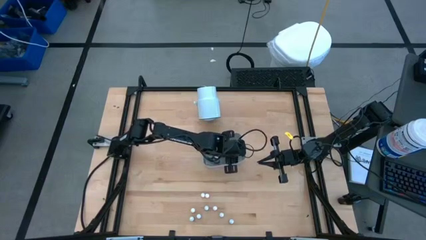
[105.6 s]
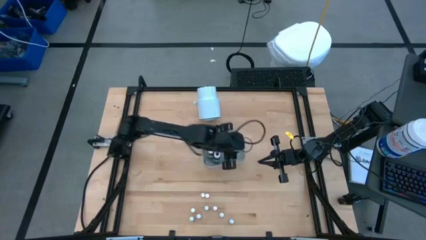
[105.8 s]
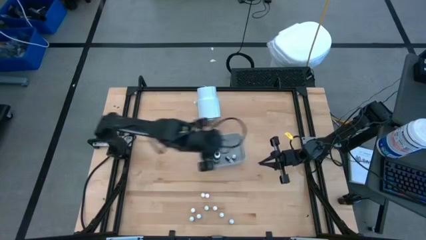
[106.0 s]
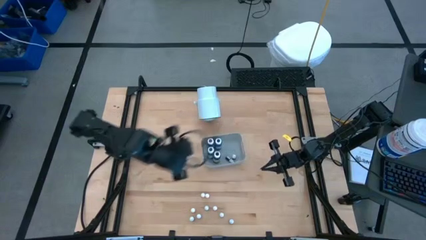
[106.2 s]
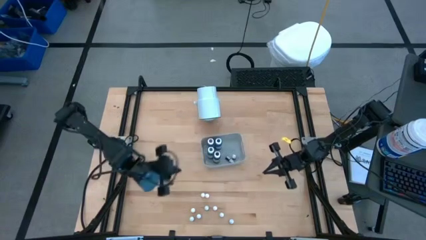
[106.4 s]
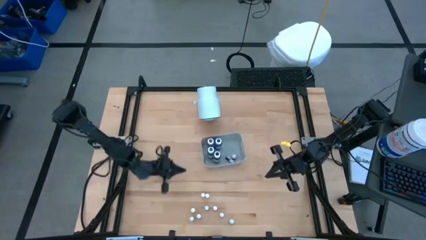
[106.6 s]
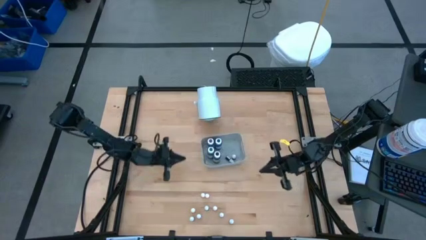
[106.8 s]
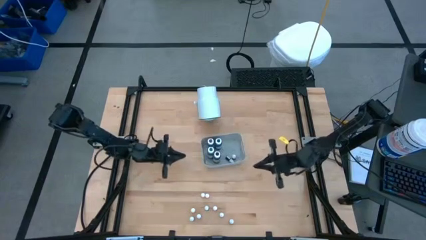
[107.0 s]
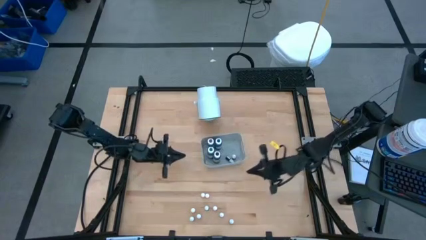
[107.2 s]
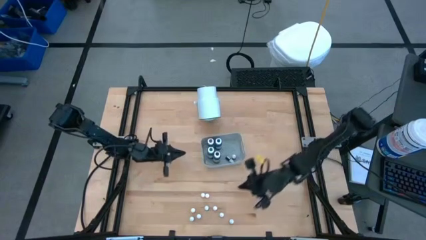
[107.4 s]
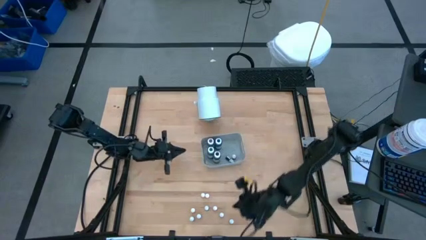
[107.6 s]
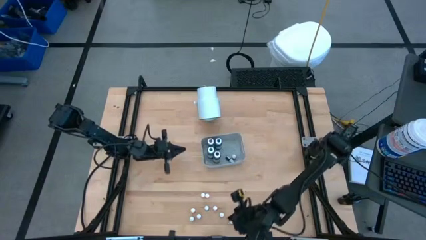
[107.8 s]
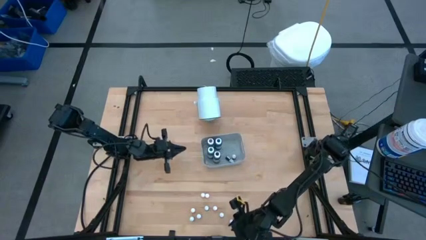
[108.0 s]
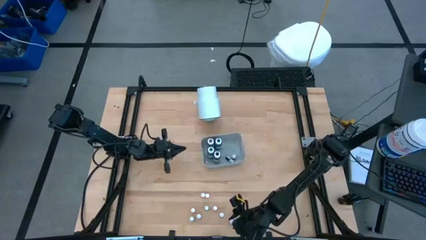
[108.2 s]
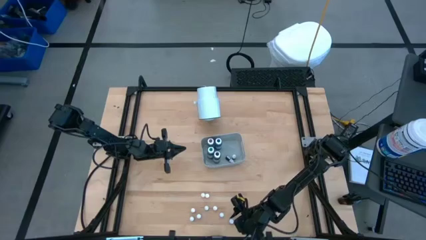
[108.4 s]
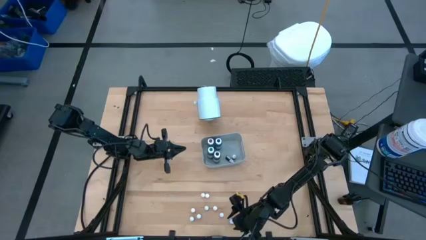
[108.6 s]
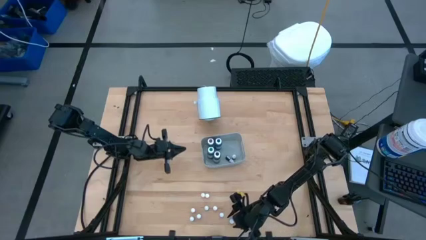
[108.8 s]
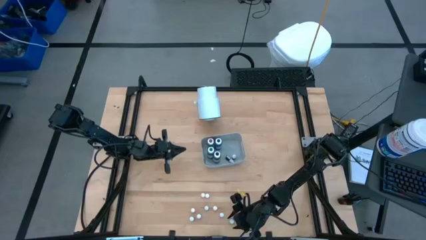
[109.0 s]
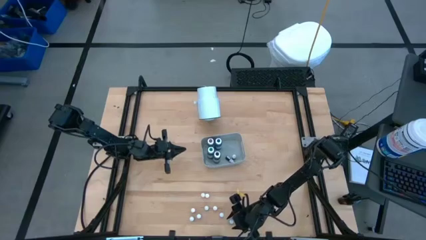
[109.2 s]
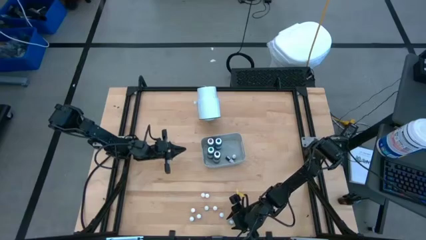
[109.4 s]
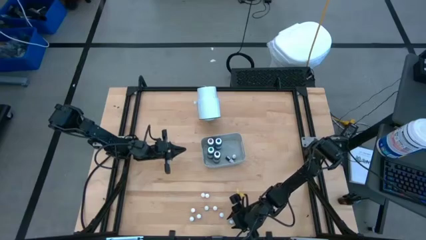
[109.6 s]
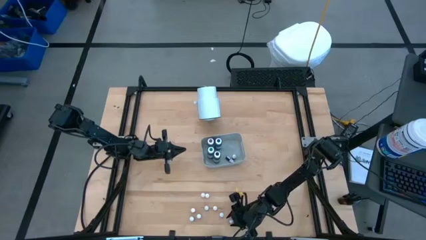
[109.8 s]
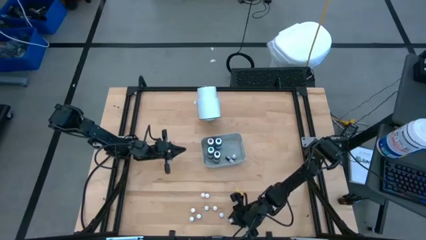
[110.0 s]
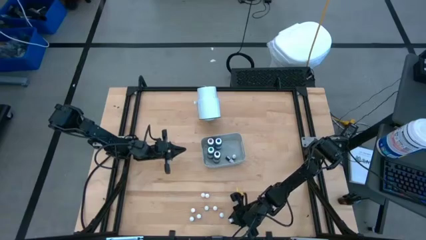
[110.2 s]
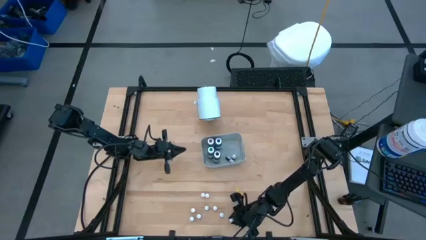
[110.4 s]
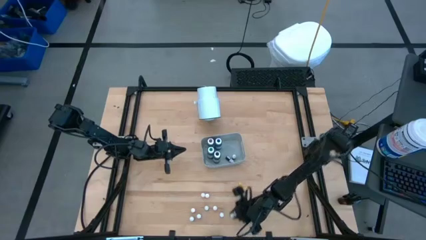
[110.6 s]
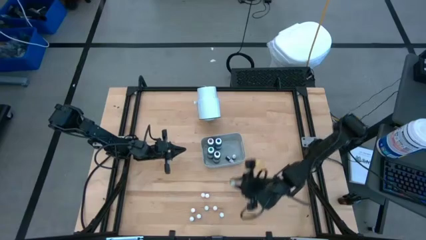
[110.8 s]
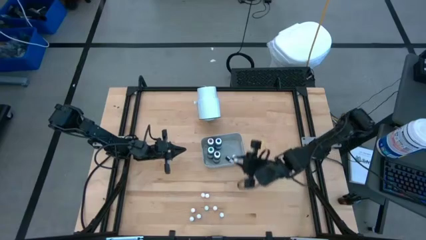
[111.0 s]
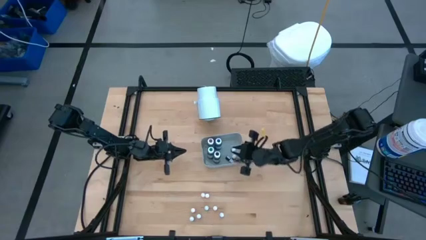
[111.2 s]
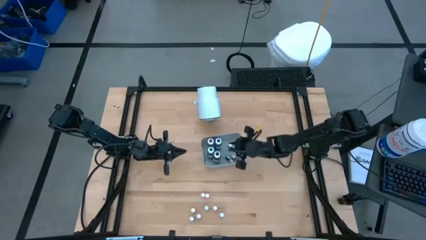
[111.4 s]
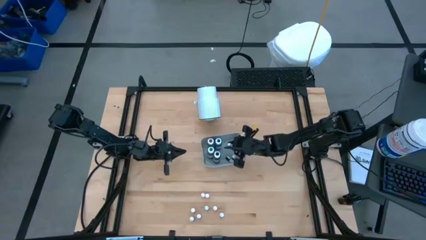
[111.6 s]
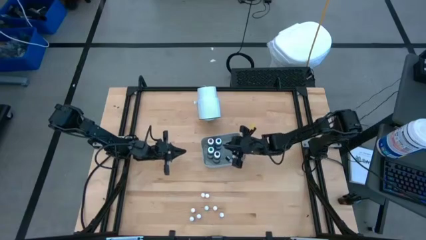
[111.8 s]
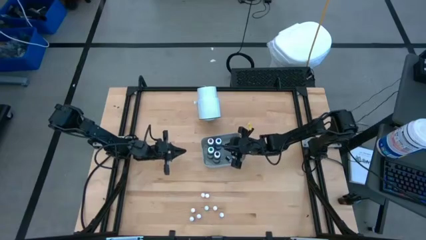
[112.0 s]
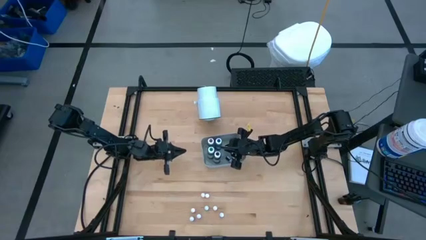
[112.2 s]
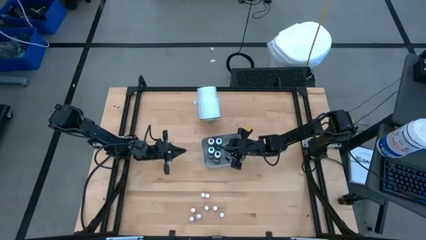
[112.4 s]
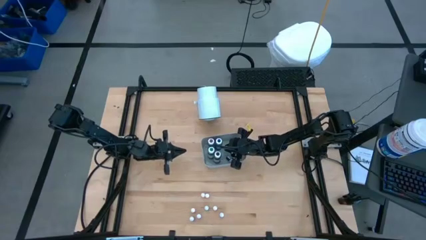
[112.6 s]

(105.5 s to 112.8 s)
Task: Pick & Place food coloring
Put the blue food coloring bottle into the gray bin

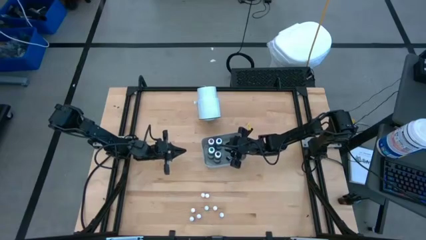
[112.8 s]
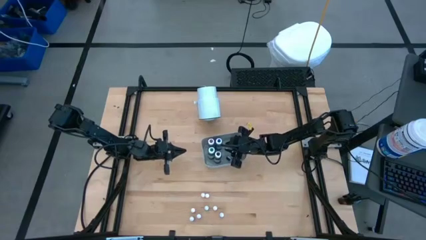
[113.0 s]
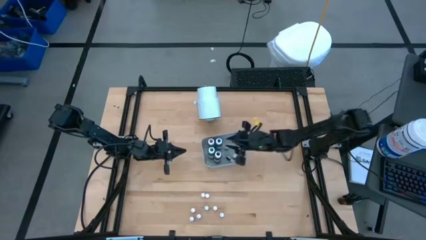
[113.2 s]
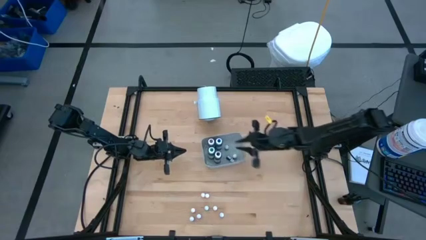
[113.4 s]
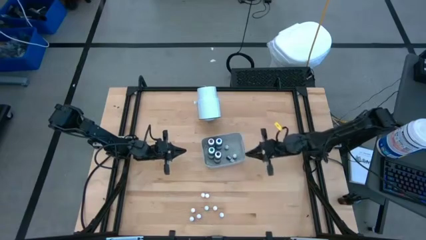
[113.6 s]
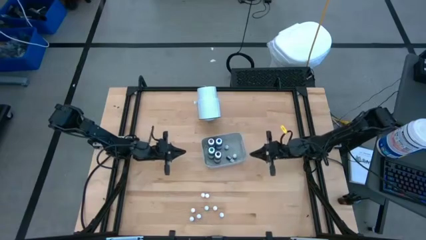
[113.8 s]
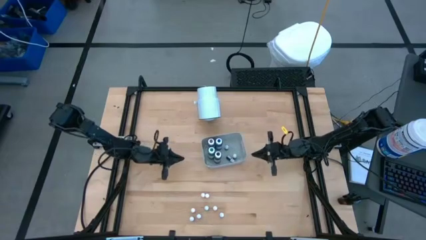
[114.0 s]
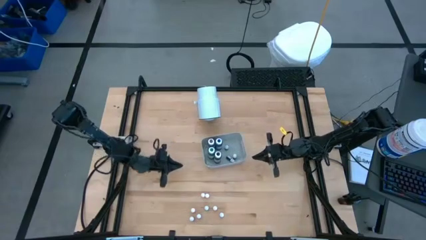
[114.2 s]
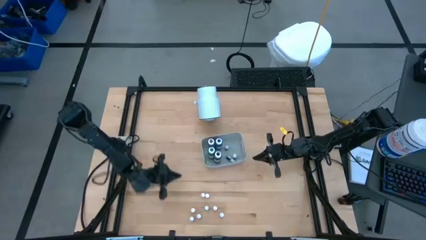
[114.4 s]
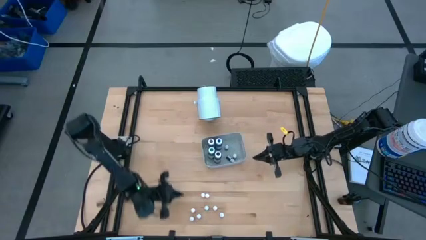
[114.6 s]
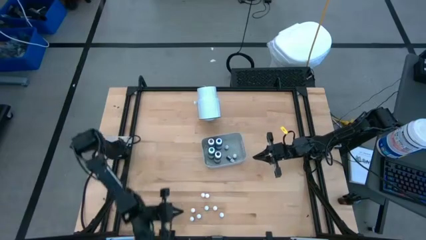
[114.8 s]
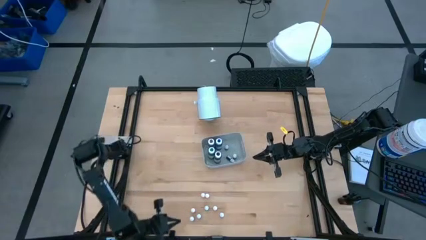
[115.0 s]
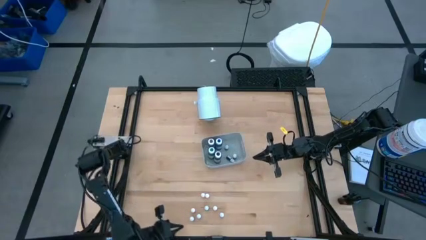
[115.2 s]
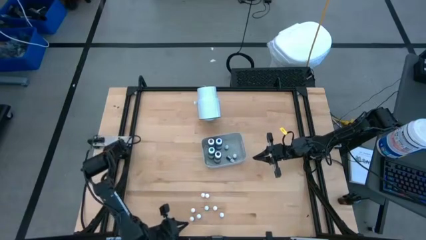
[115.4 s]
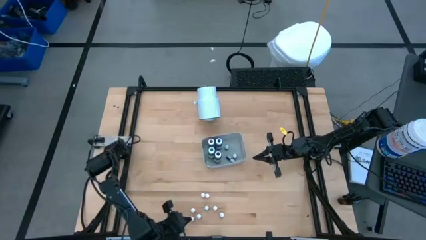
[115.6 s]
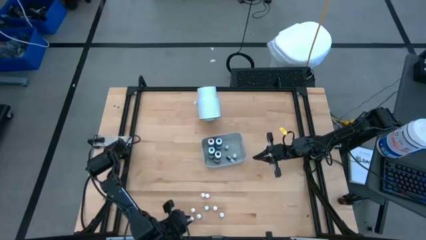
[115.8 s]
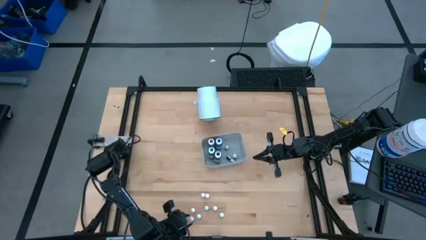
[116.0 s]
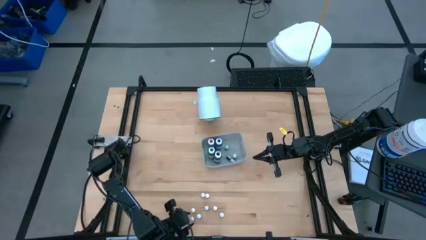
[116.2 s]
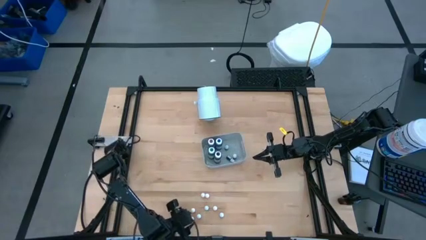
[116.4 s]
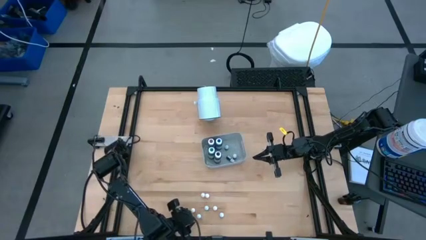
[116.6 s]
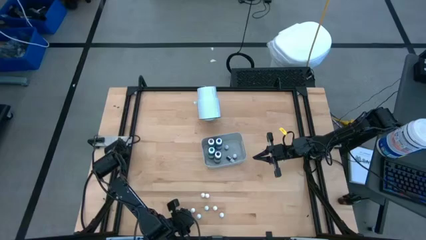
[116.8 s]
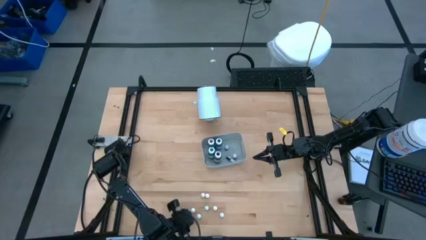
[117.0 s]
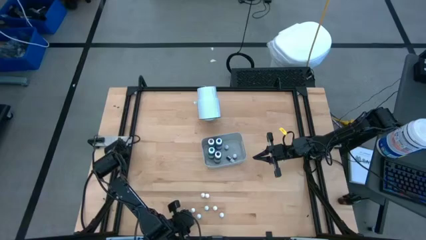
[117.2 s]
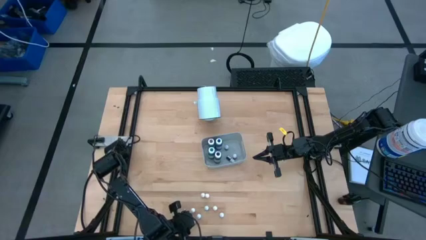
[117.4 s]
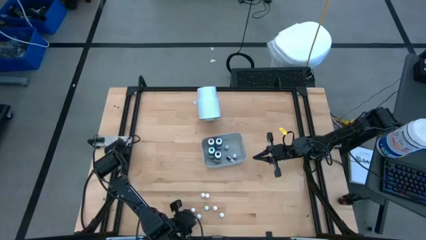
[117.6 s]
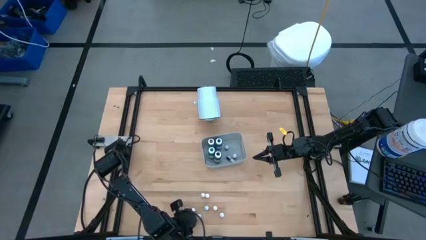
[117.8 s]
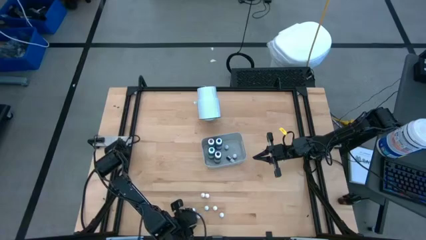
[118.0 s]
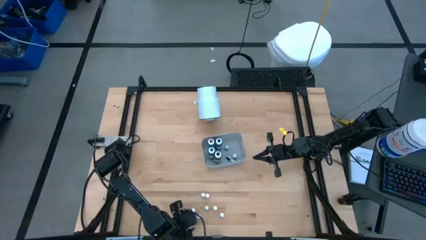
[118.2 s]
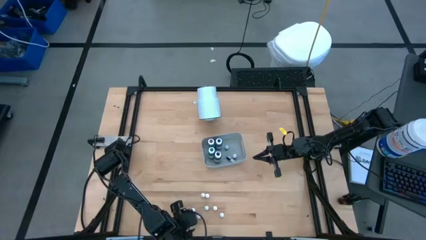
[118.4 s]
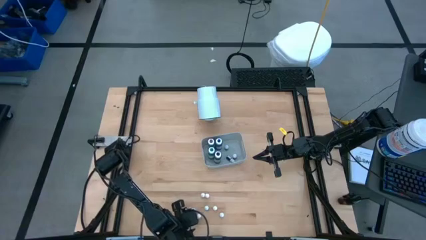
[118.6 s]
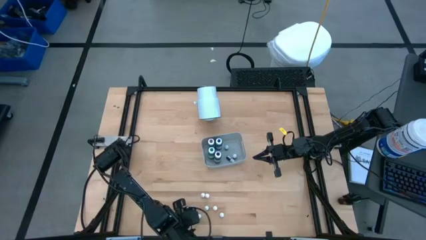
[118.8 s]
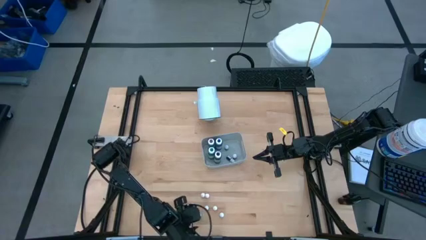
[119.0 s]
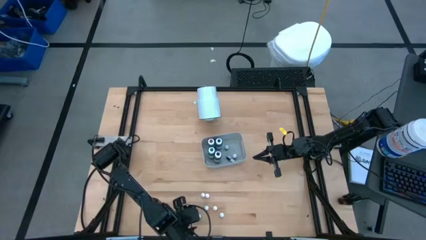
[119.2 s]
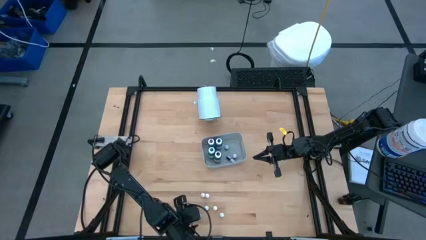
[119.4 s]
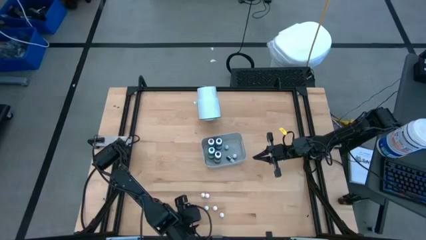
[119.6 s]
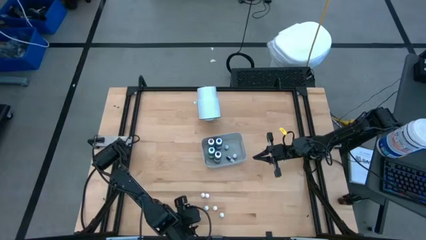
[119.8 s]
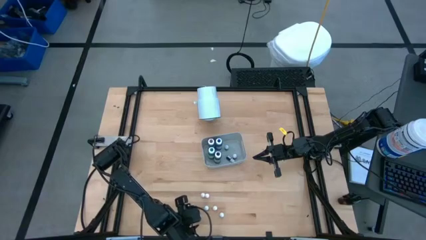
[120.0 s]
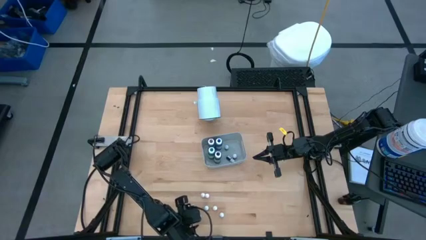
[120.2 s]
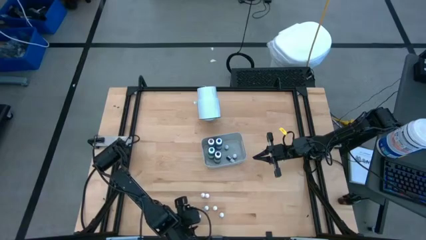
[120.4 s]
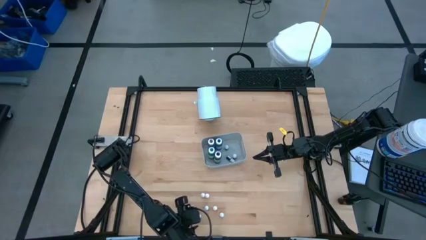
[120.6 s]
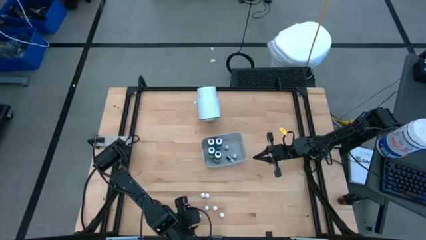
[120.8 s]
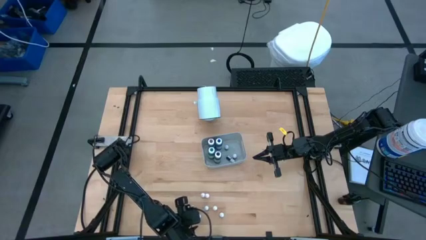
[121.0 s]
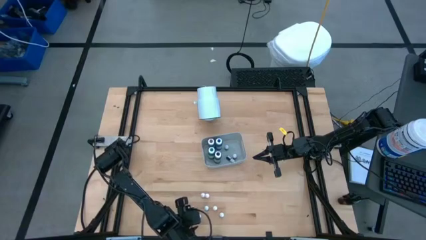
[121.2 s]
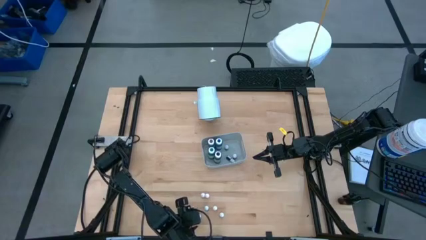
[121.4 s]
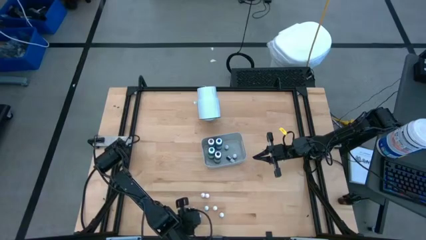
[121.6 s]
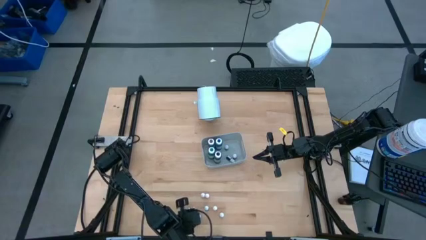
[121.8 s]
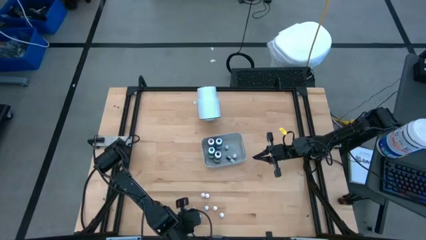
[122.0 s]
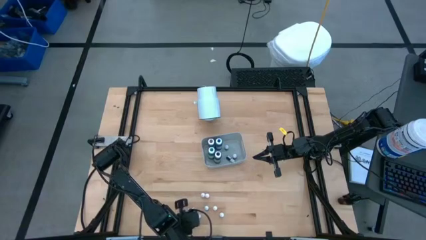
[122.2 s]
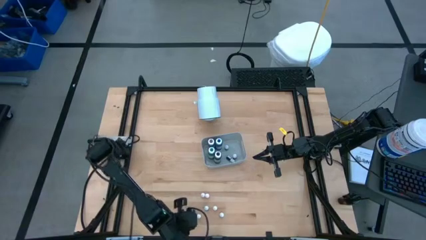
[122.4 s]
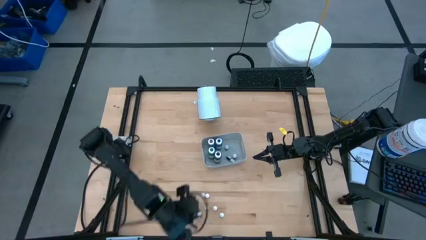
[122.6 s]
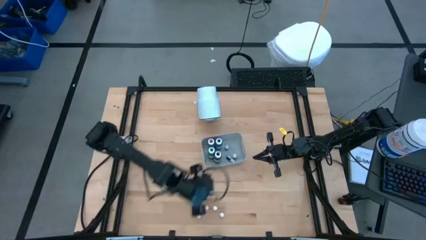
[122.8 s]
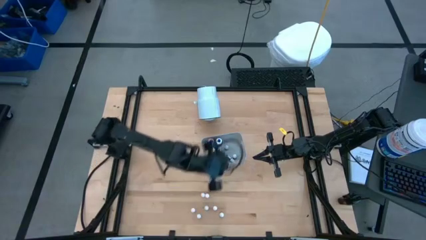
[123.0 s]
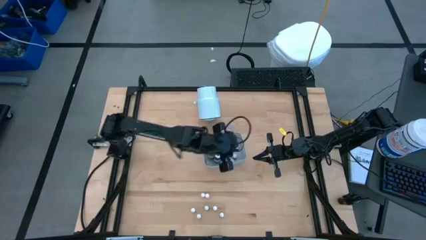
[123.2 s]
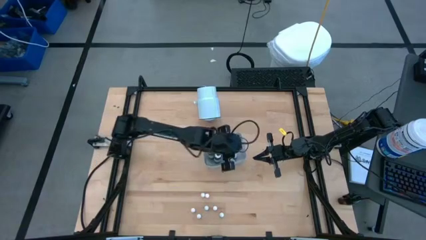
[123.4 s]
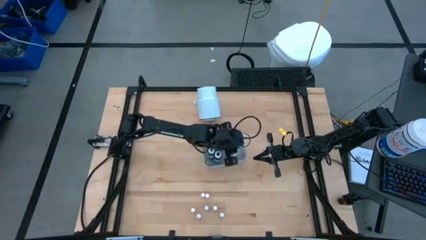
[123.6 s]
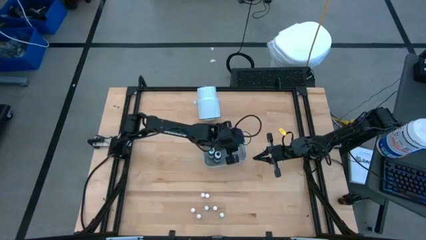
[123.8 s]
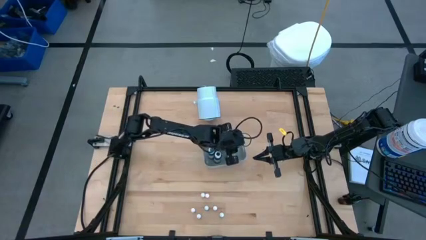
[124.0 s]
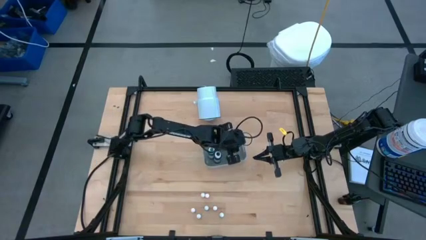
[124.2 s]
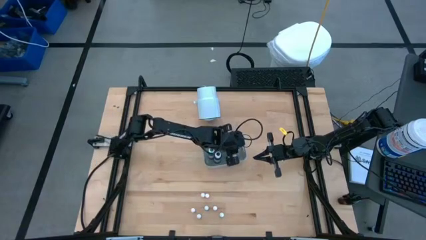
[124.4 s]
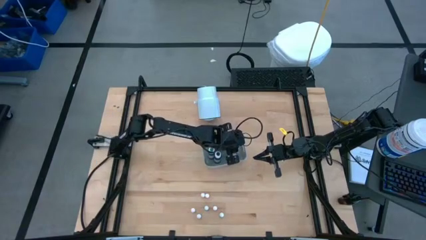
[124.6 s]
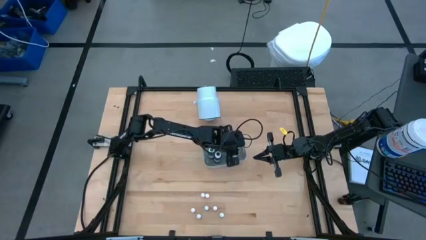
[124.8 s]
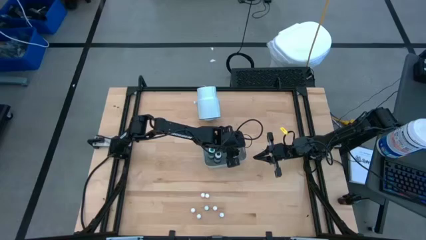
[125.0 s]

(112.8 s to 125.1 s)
Put the blue food coloring bottle into the gray bin
